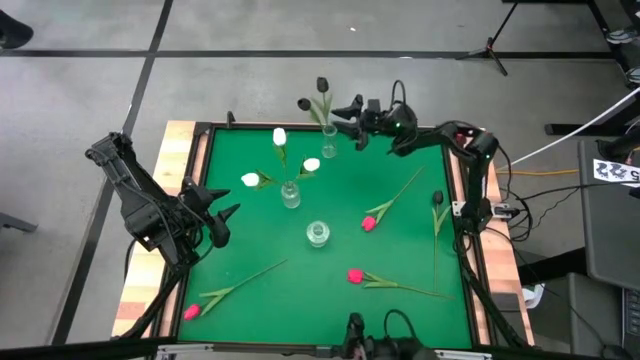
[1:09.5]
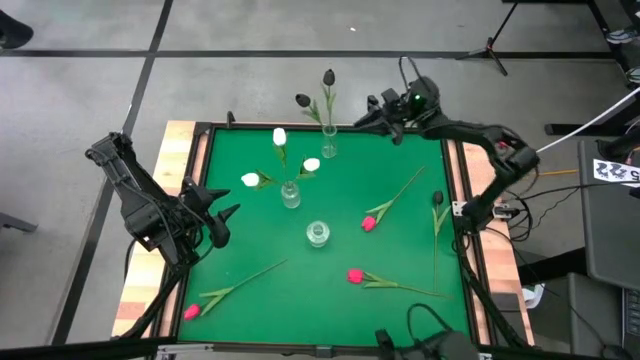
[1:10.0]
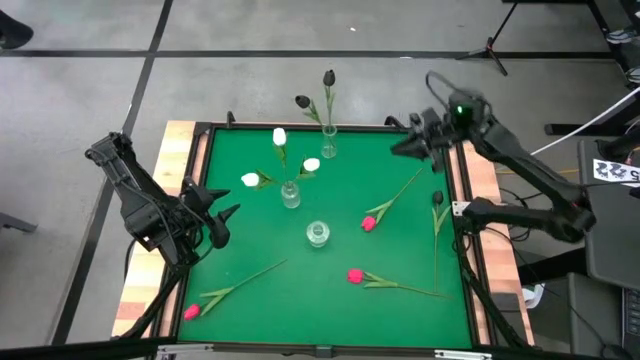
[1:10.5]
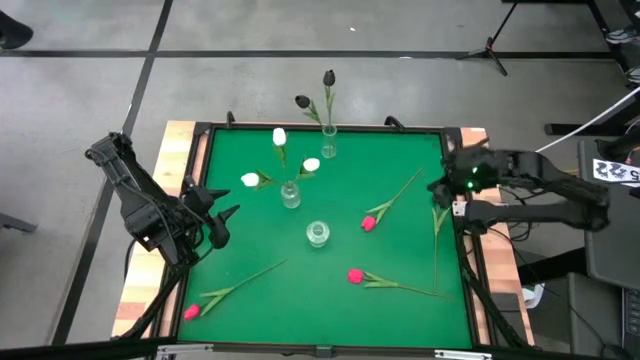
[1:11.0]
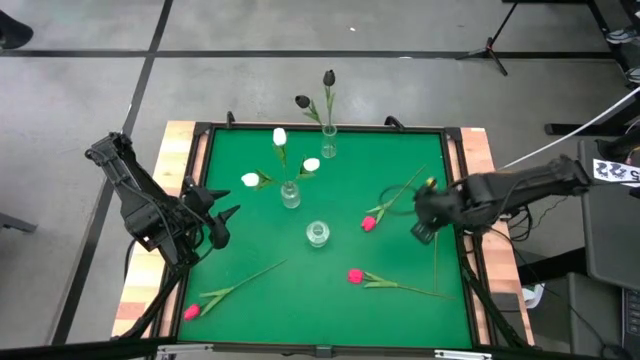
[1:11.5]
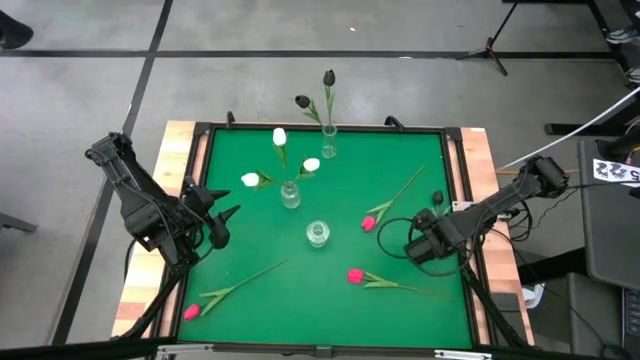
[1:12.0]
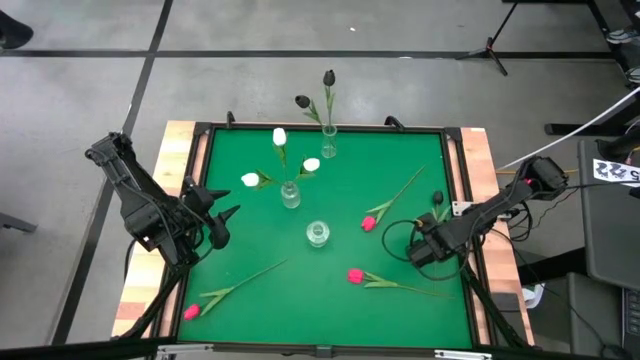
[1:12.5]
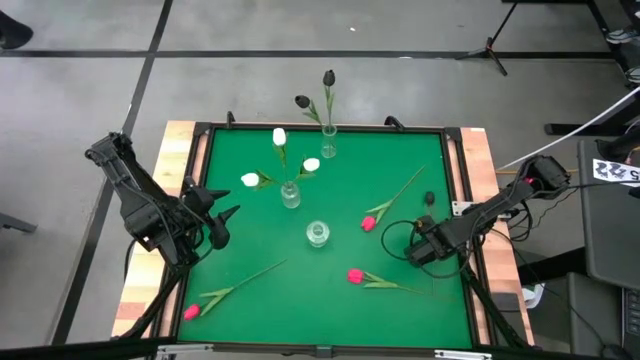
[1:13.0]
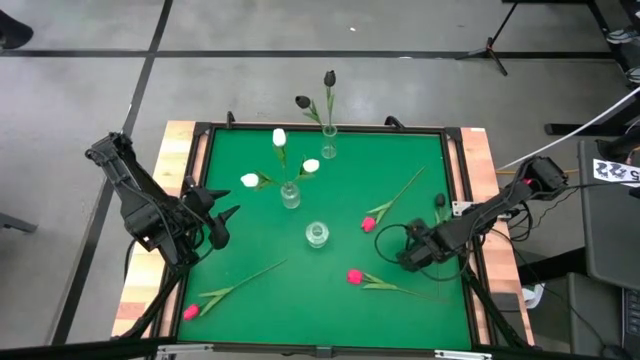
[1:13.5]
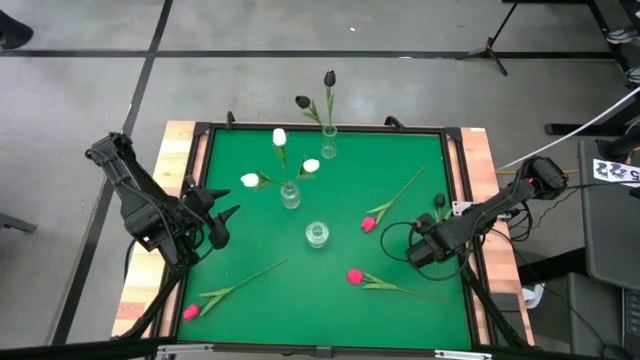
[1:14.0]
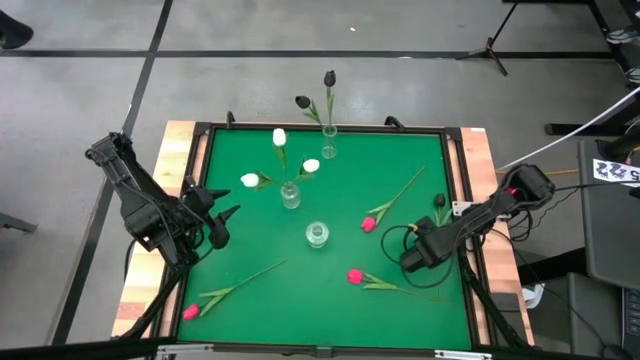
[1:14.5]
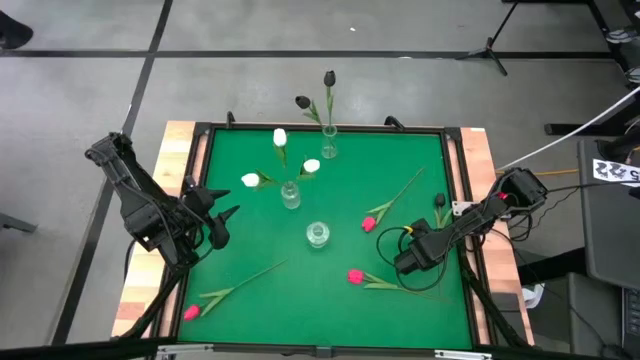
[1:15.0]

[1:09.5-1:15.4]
Task: Sort flowers into vase by color
Put the black flower into the top transparent vase

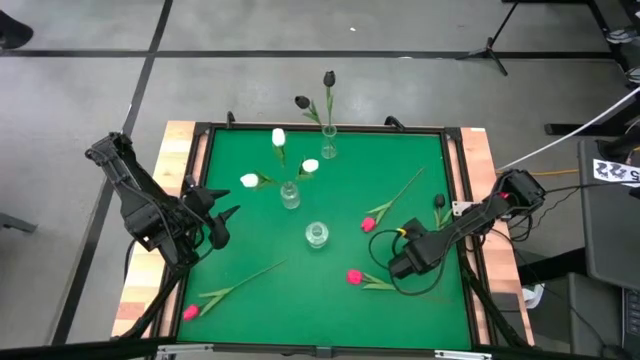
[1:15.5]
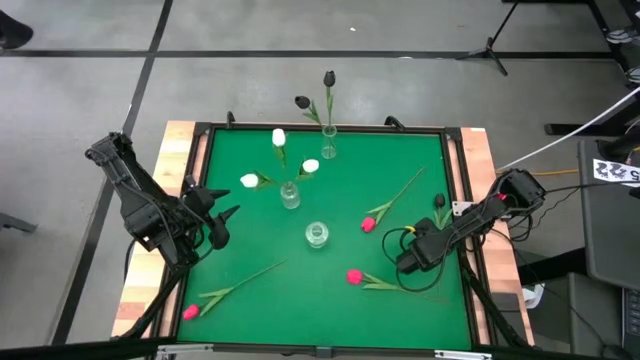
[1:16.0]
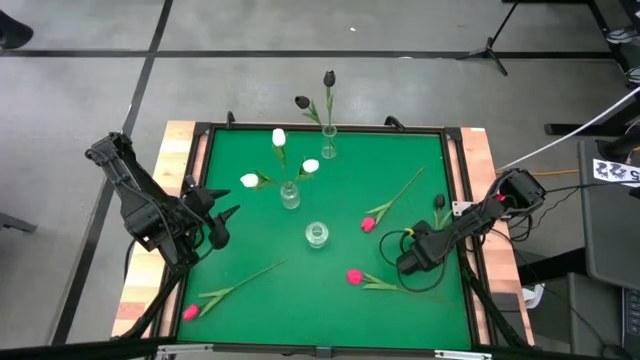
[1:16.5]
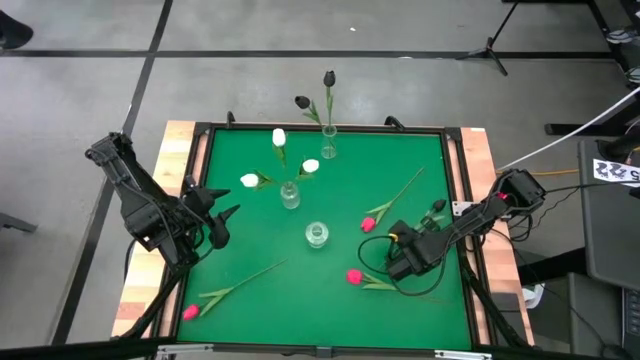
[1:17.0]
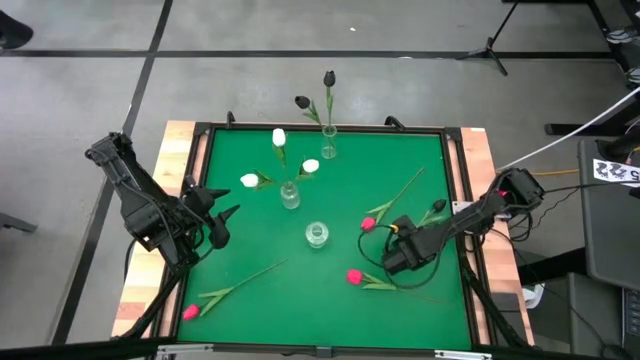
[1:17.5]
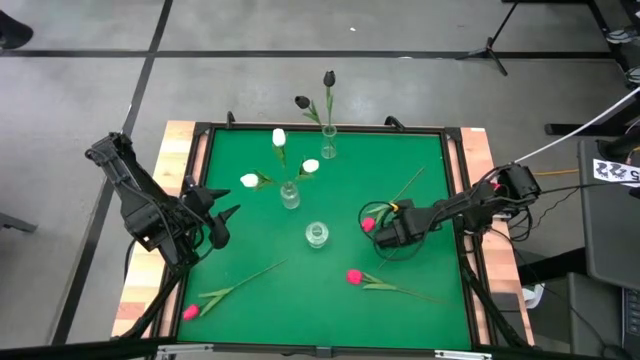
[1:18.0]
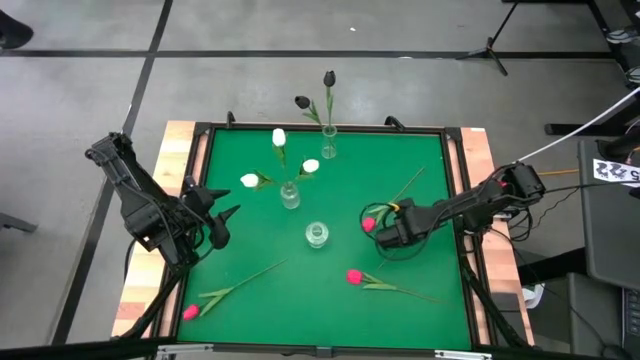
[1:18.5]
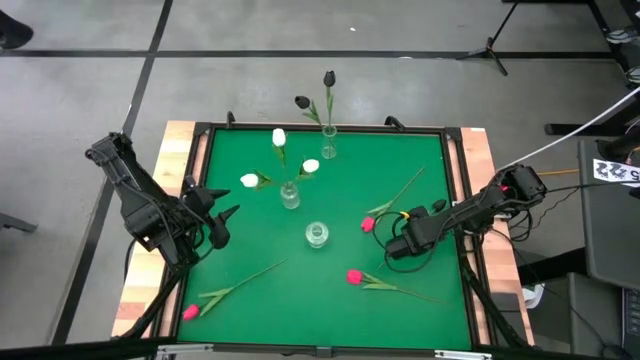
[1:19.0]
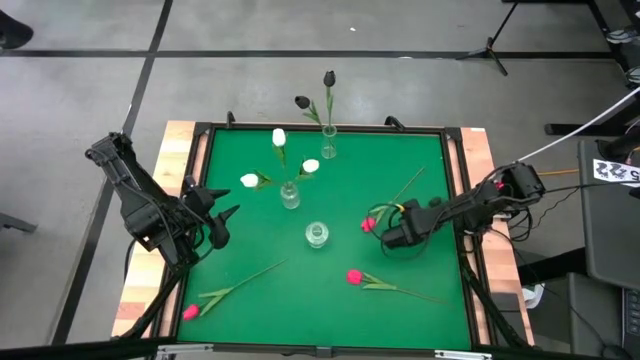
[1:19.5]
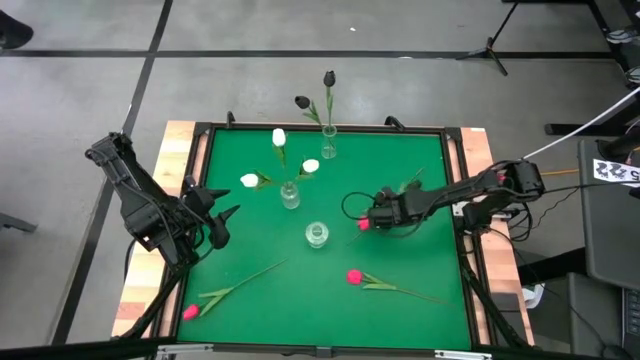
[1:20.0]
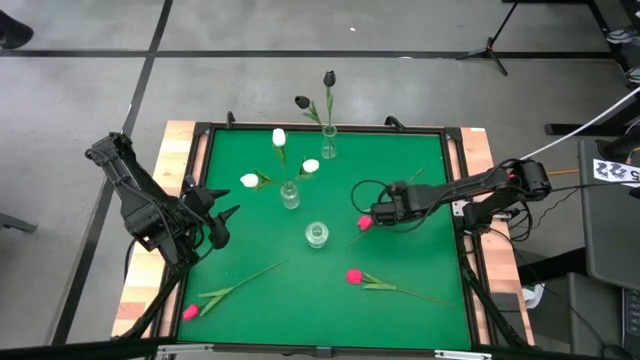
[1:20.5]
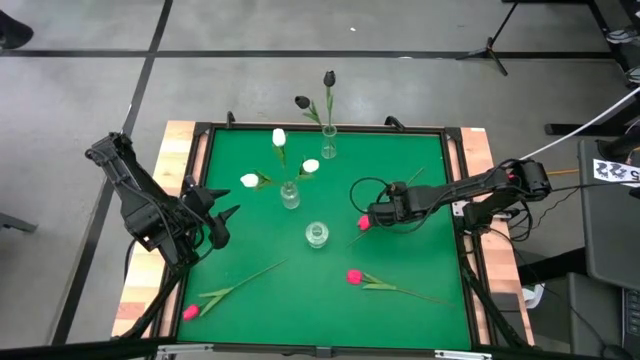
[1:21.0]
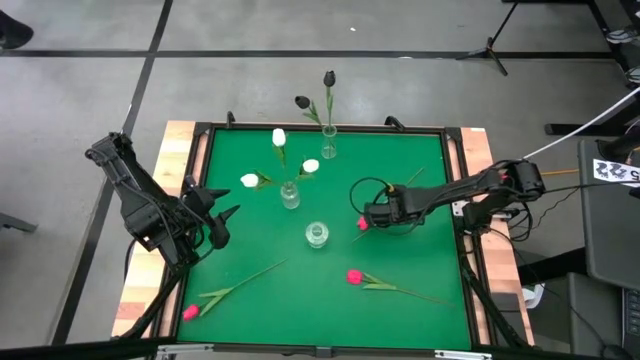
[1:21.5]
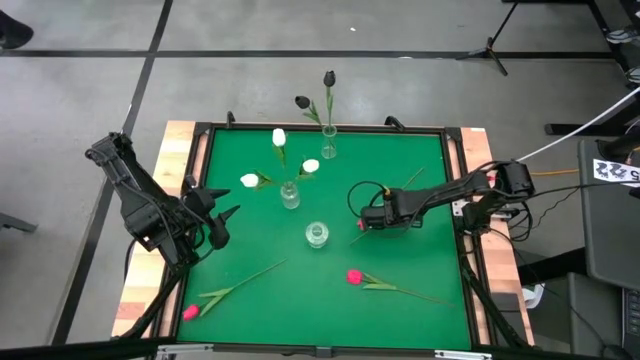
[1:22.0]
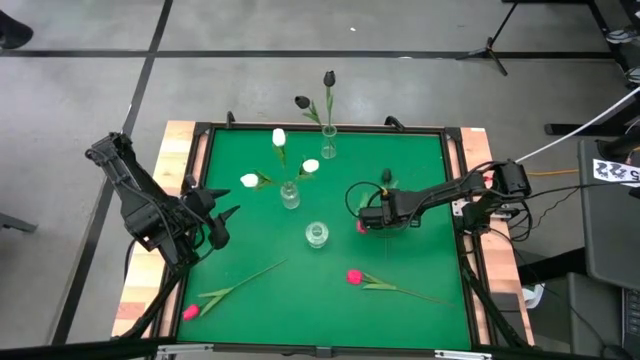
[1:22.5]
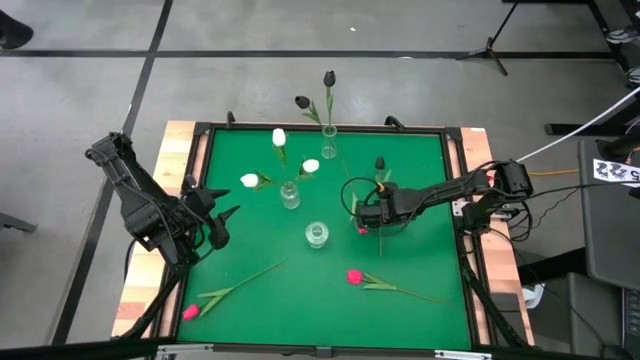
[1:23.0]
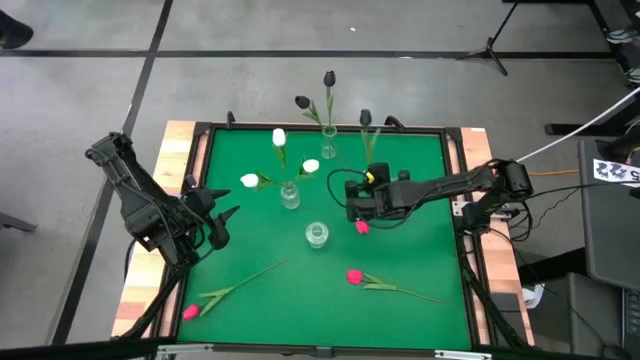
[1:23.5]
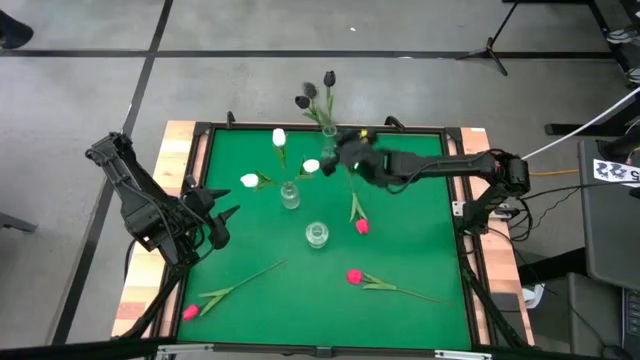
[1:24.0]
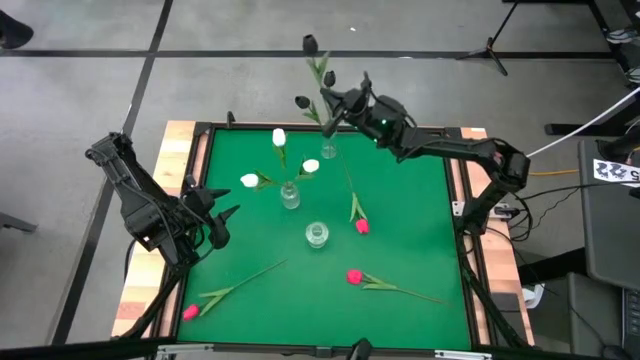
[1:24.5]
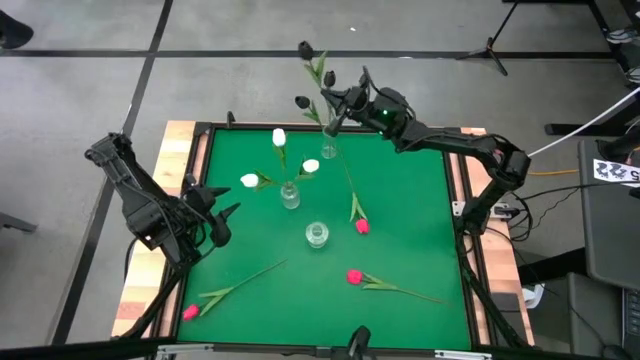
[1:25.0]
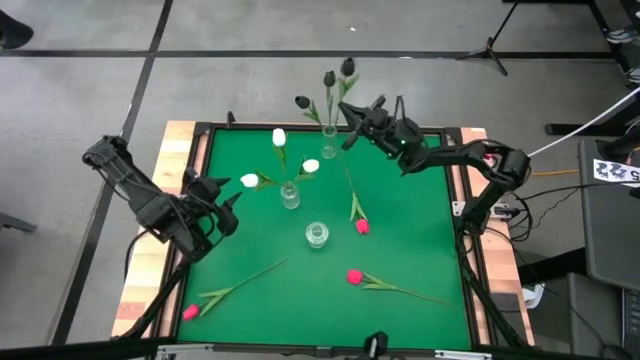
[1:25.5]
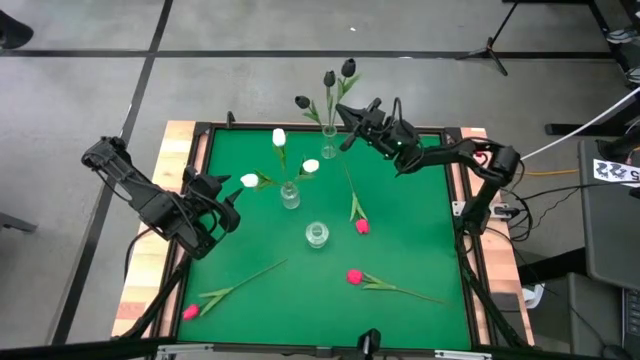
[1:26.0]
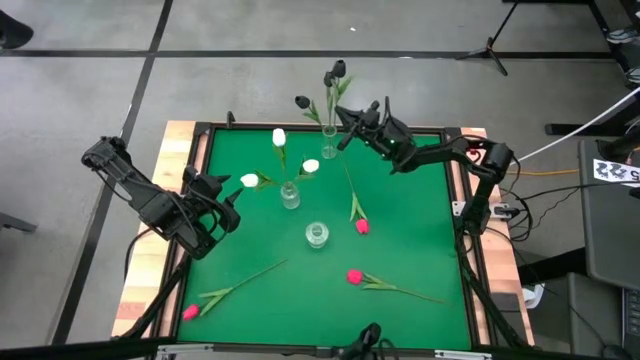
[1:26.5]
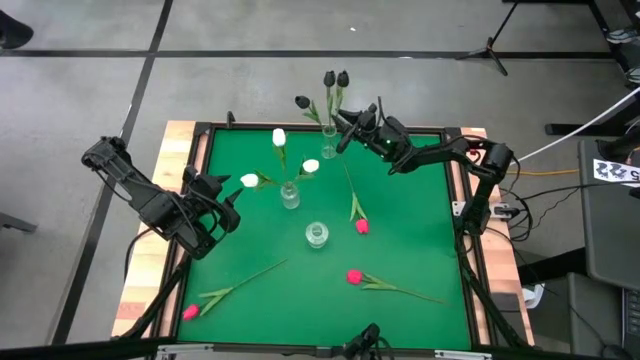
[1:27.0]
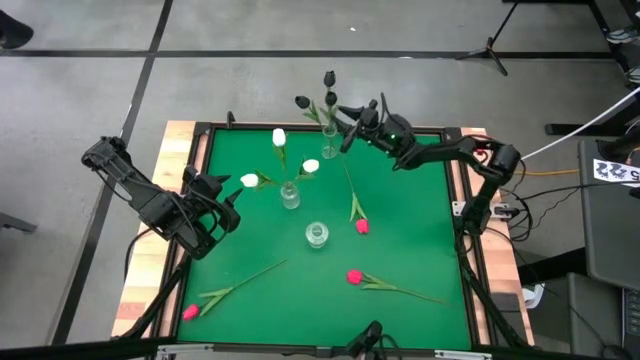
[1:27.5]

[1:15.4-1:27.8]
Put the black flower into the top transparent vase

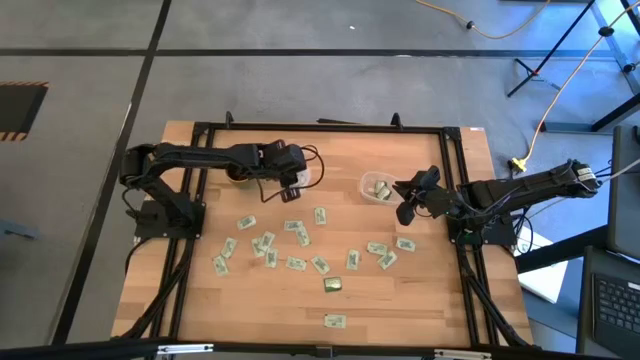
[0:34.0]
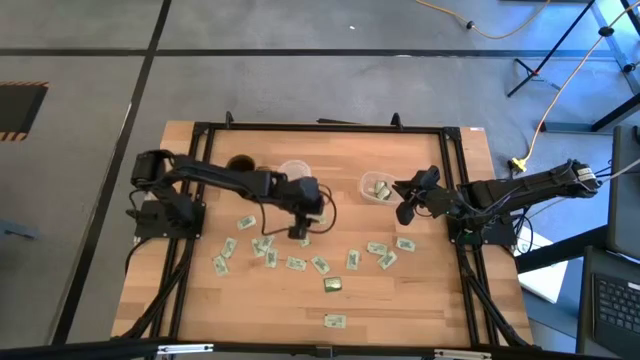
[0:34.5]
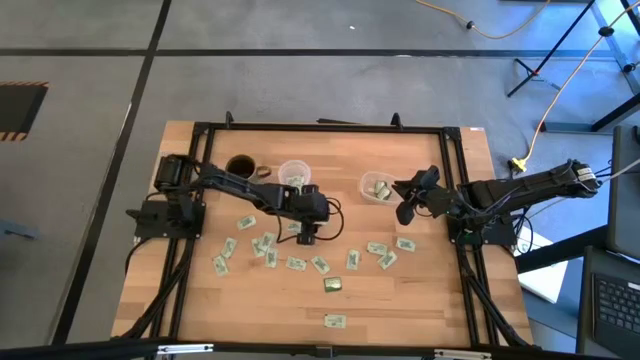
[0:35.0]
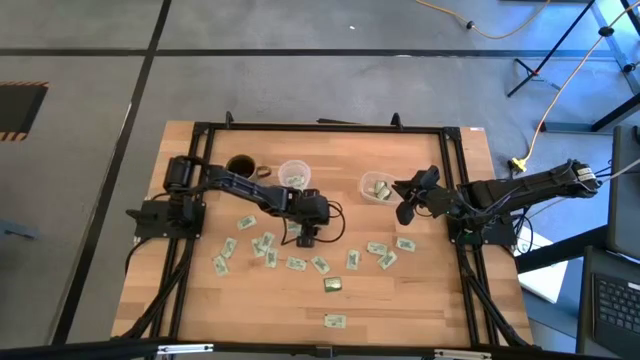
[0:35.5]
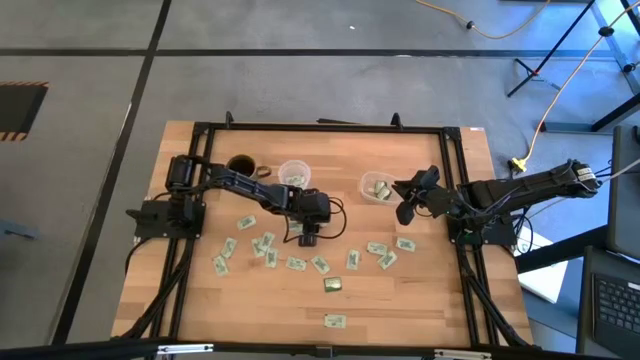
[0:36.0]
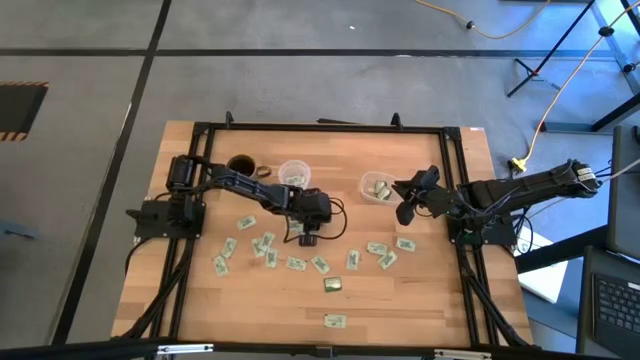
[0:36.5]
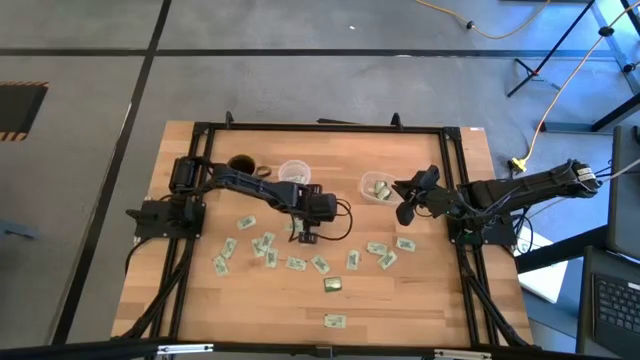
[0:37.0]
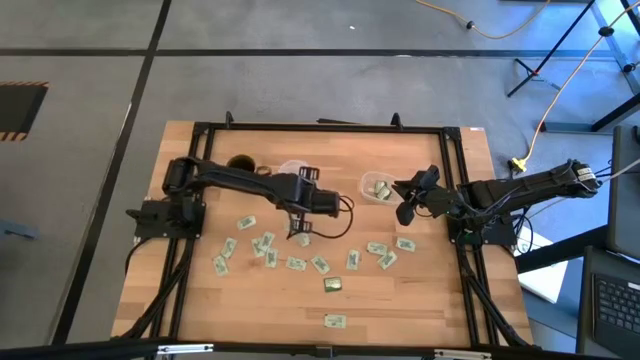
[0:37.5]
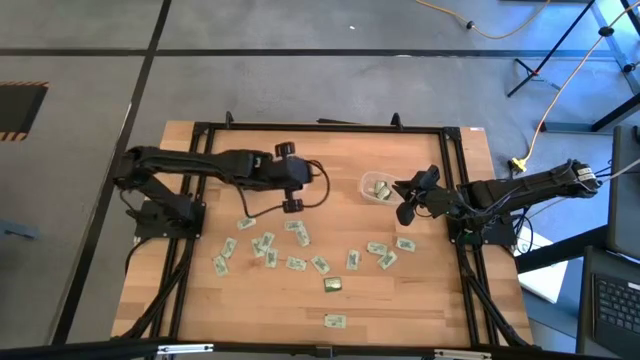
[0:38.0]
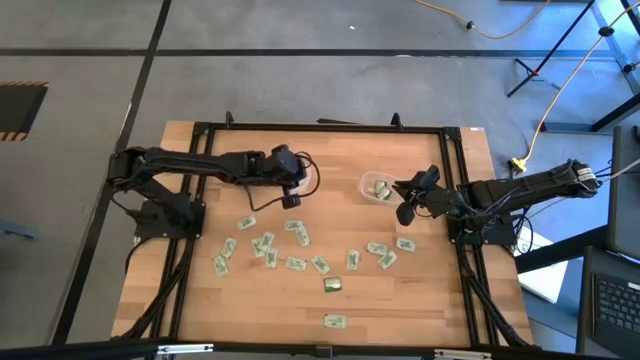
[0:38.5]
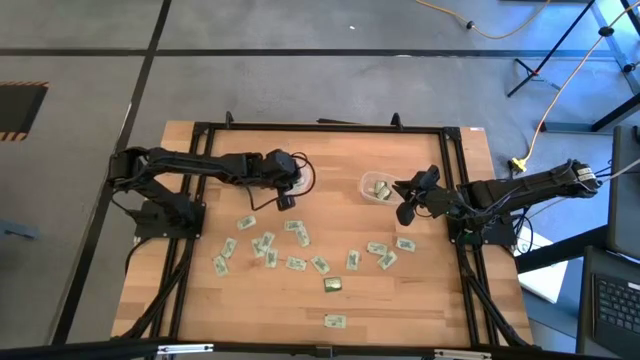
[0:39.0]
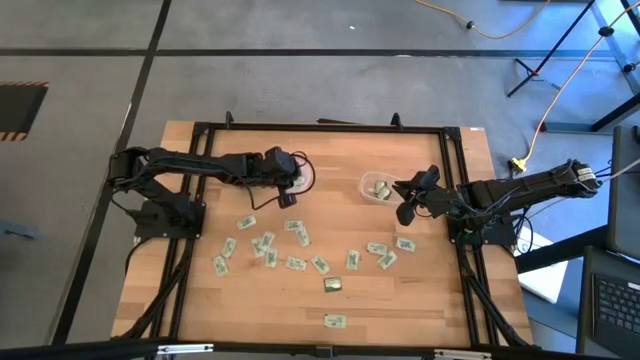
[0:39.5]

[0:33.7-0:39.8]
Task: Pick and place items into bin
Put the white stevia packet into the left transparent bin
